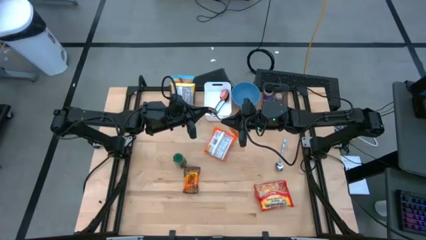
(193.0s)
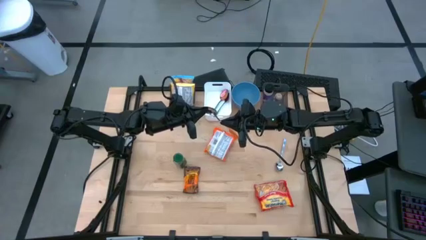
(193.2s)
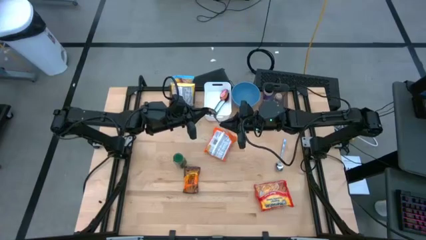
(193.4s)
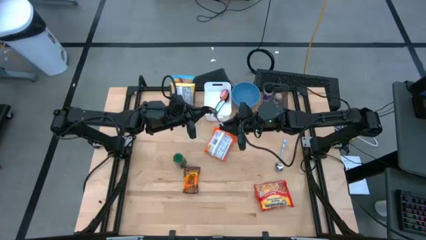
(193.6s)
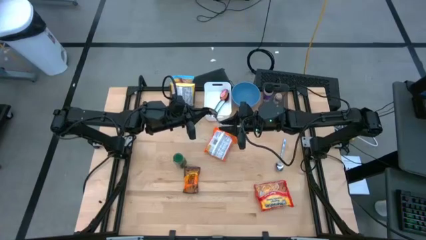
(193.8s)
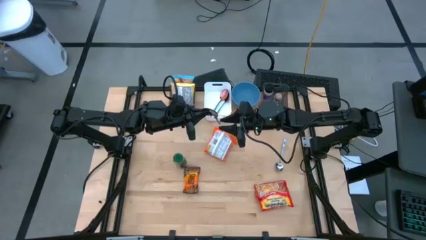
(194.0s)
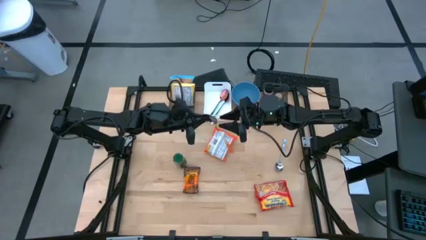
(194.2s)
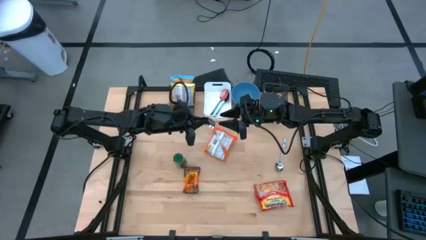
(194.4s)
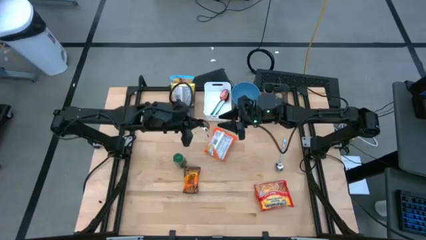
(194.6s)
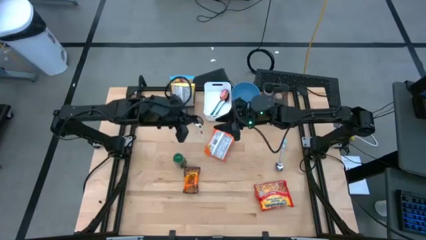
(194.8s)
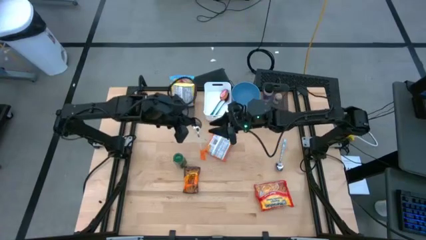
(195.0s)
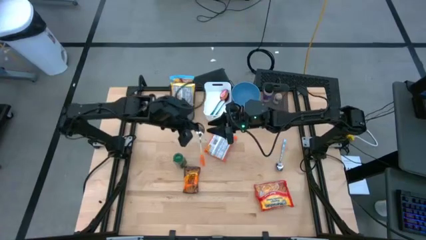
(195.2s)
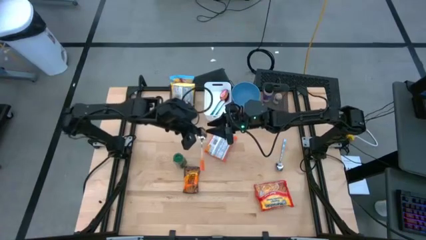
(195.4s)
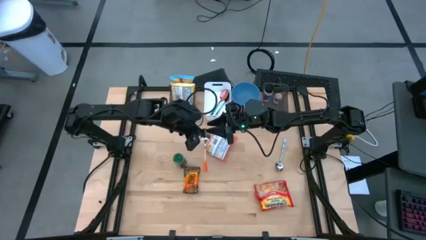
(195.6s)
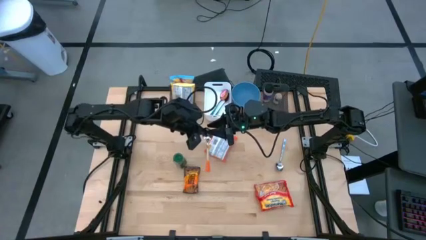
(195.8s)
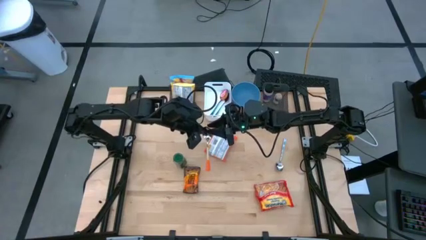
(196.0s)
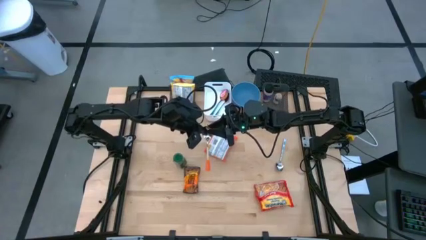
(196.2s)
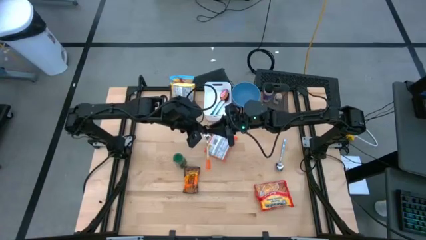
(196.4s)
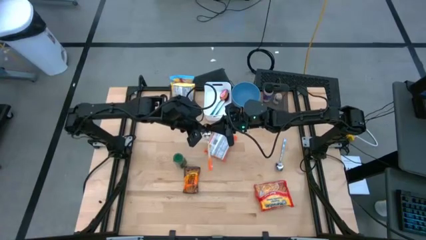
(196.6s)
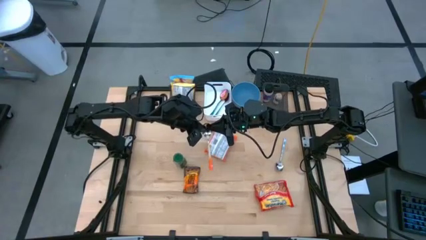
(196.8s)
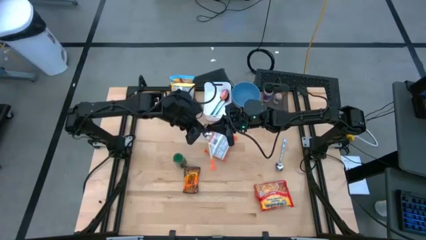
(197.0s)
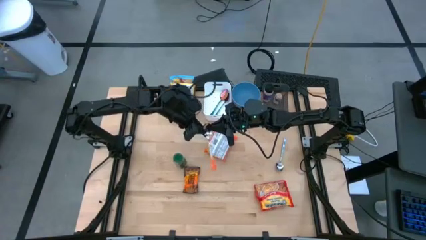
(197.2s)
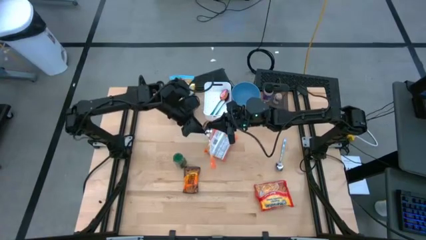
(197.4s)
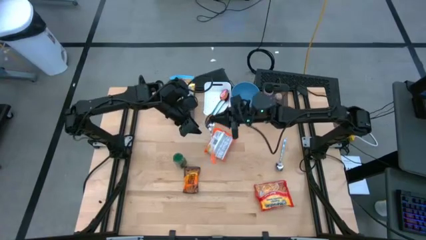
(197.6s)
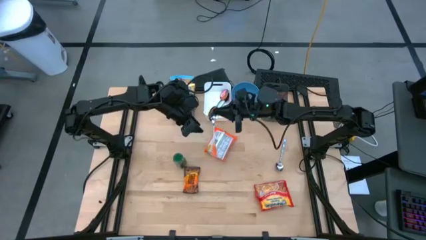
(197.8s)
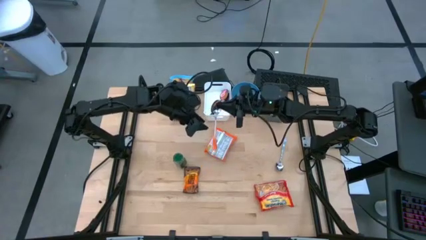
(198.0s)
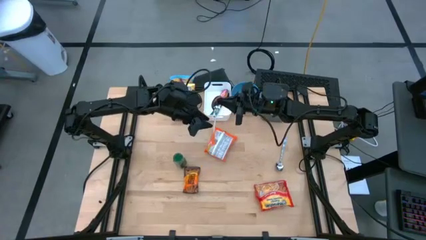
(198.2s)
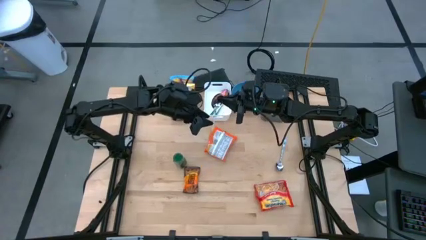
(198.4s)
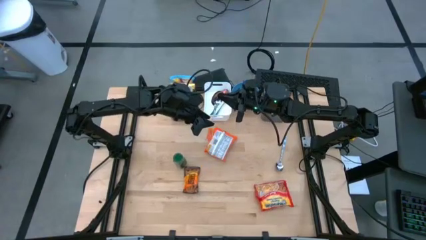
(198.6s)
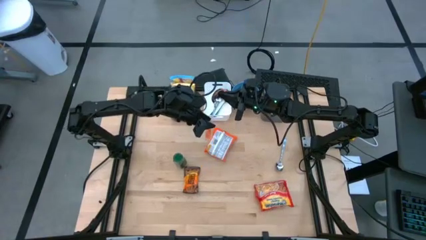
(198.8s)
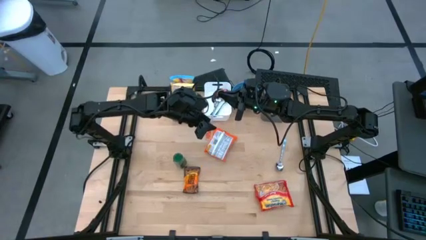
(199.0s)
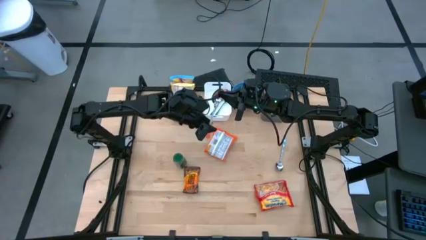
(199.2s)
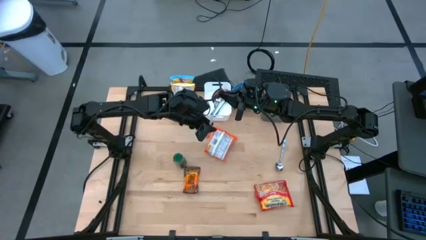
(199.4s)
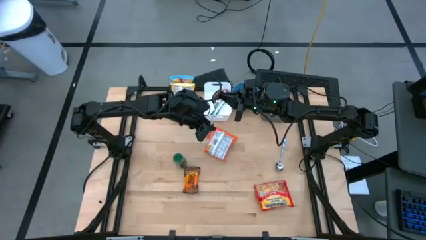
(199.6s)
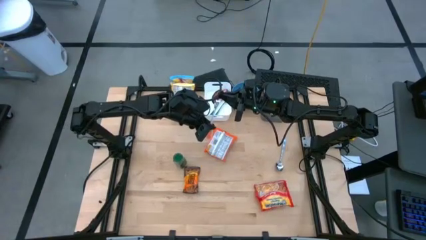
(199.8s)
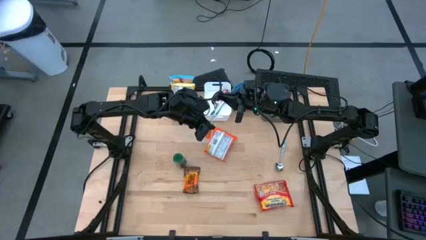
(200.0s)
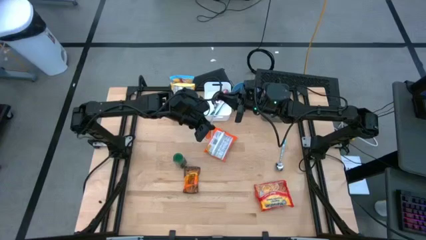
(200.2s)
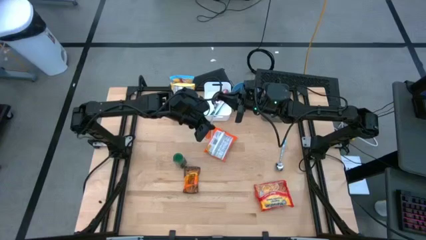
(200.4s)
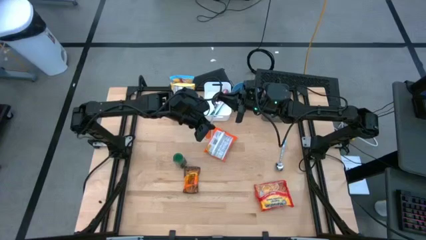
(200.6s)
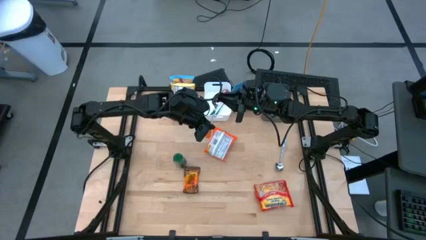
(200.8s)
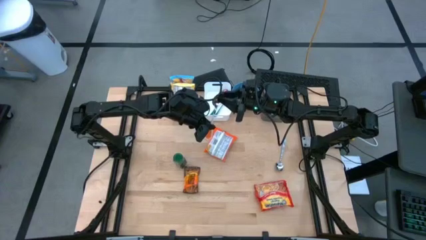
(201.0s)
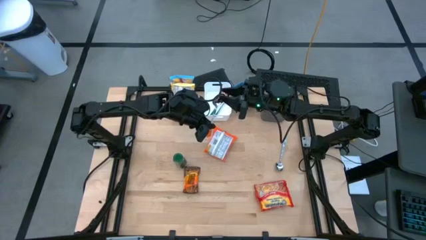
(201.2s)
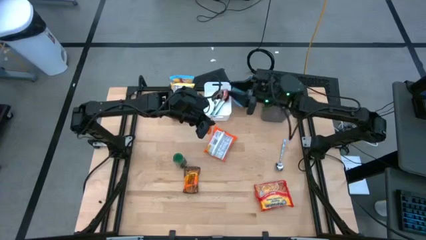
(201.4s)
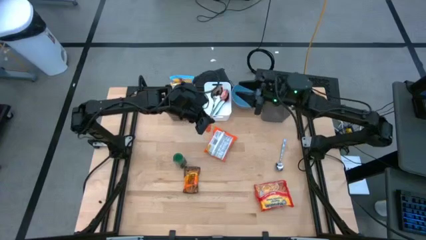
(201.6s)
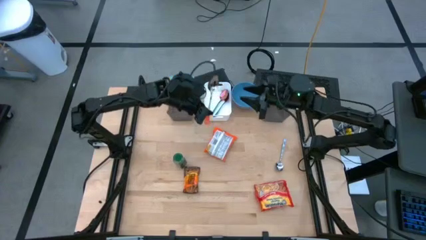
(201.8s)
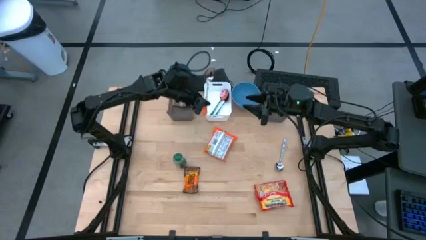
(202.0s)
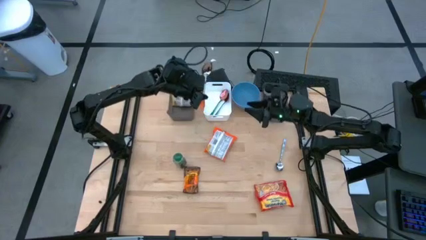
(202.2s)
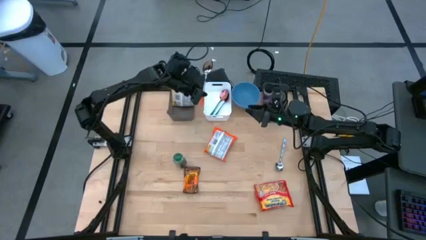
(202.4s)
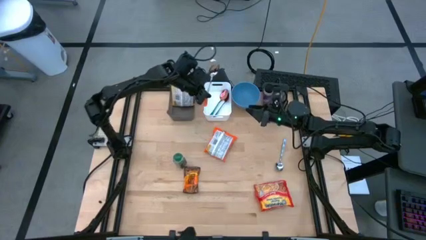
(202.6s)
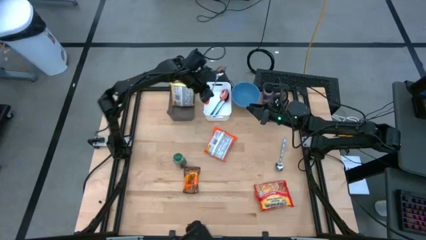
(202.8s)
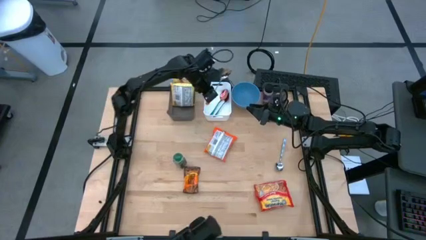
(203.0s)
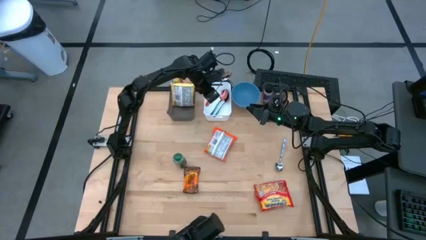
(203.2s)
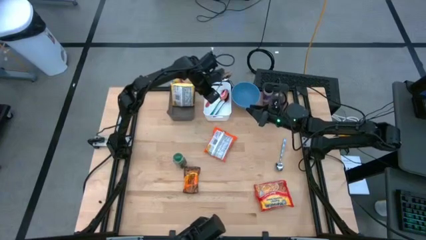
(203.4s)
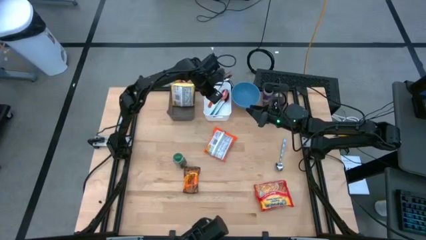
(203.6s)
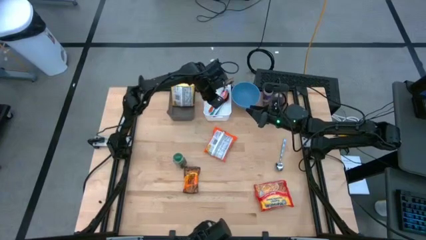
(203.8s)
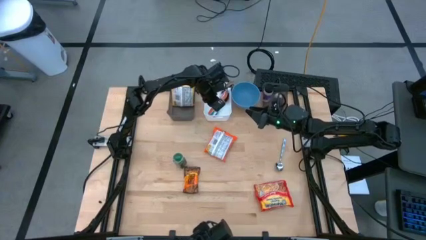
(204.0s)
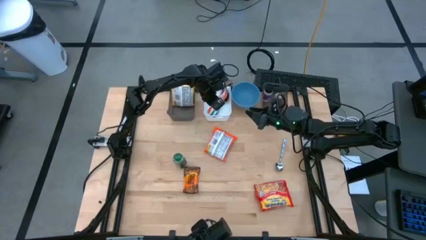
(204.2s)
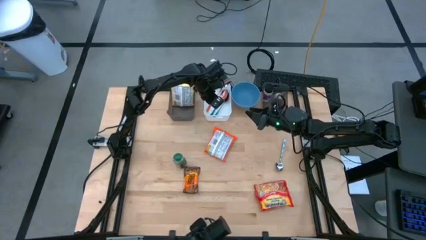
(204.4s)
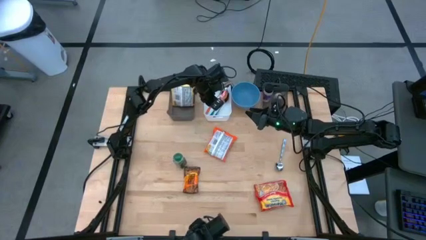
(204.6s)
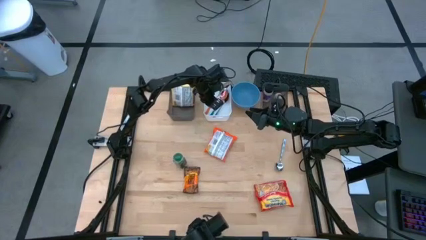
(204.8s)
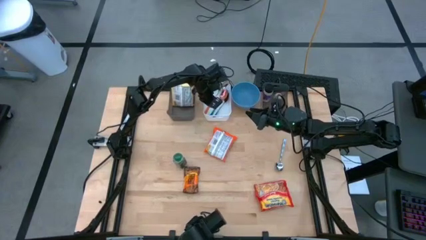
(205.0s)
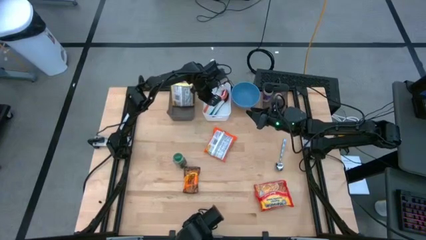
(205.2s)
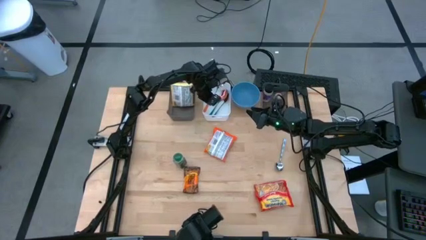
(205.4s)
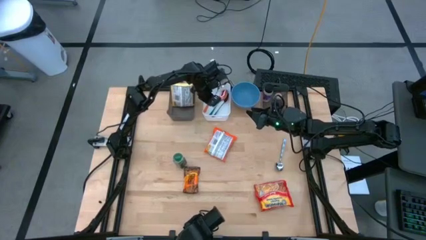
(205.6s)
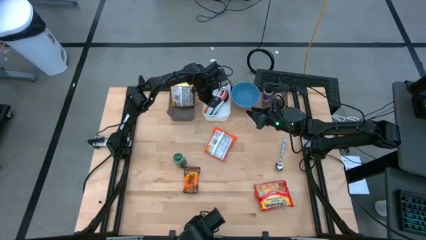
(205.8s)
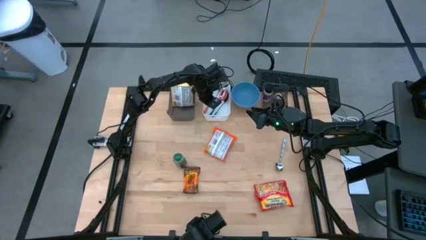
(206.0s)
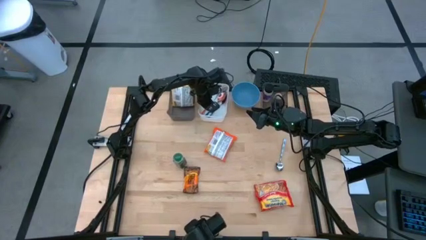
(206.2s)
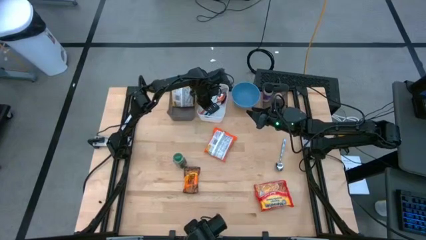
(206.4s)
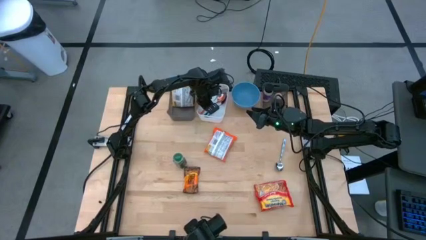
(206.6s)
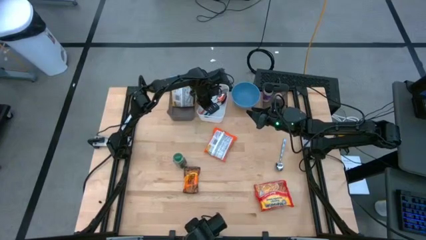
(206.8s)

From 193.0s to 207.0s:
Task: Pick & Place Food Item
Put the orange spoon into the white bin

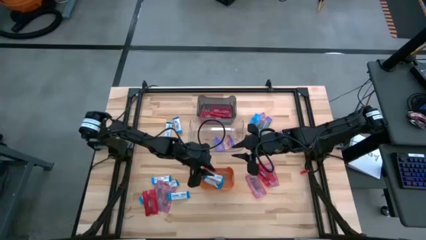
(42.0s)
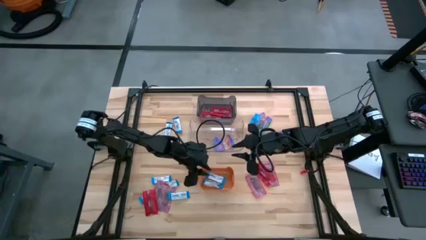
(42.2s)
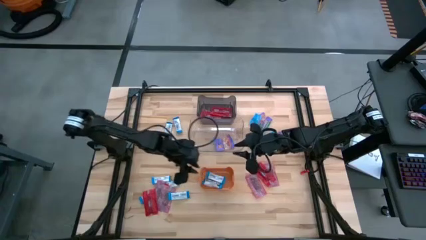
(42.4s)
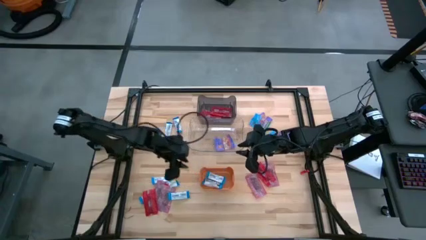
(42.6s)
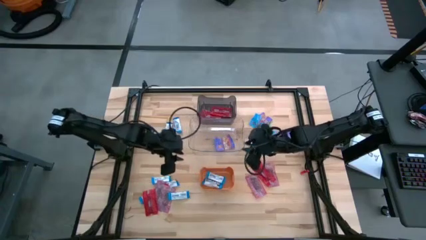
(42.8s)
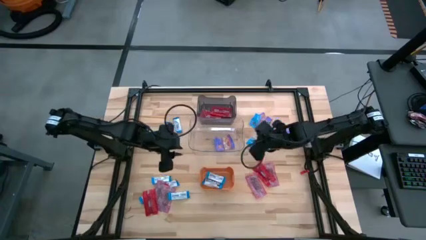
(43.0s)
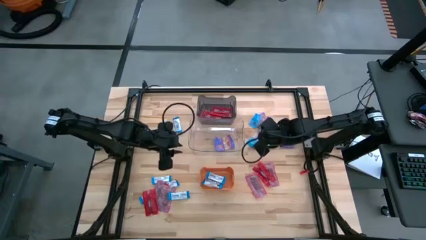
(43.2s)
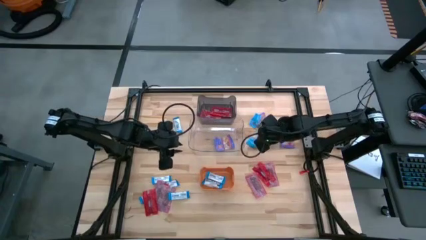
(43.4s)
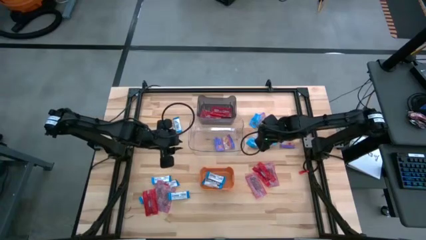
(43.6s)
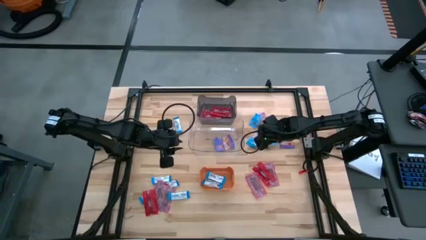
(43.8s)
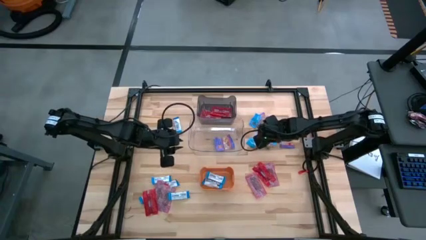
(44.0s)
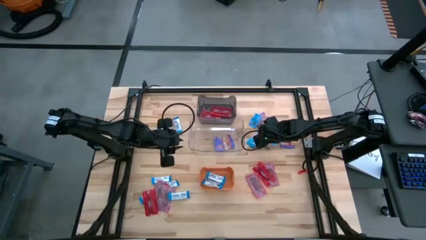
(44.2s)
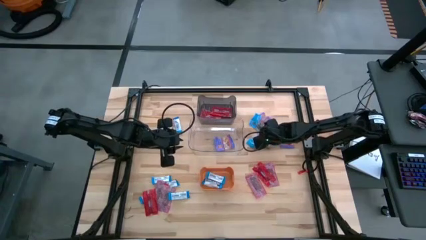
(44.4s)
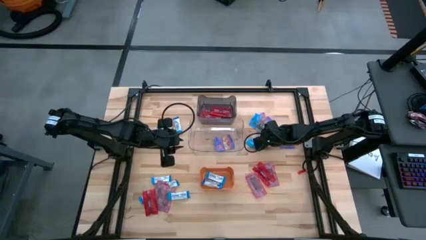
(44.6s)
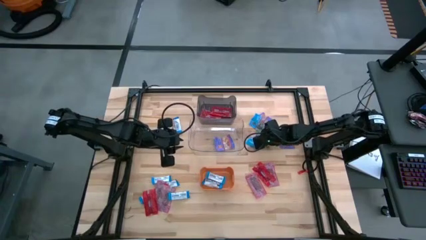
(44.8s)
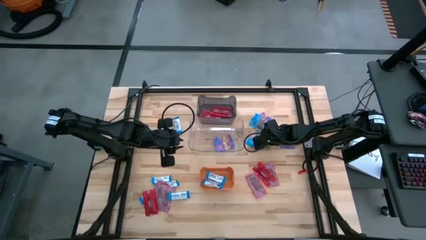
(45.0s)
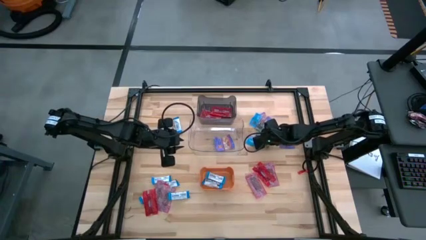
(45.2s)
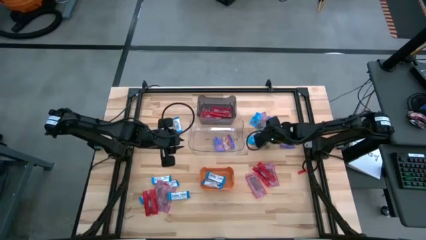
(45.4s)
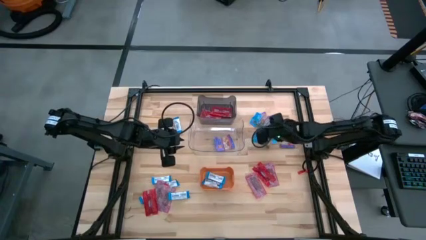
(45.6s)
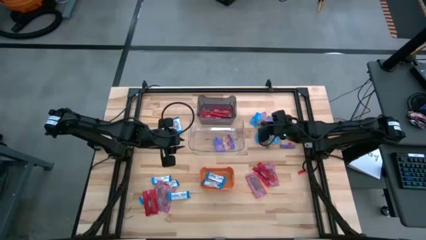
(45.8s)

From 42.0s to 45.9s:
Task: Sort candy
Put the blue candy into the clear transparent bin
